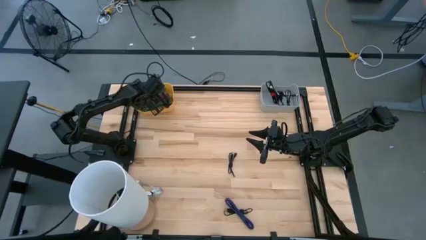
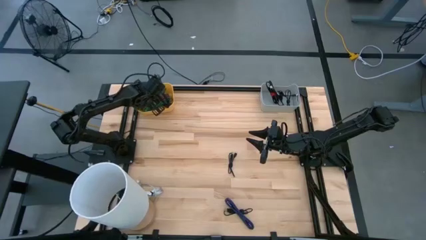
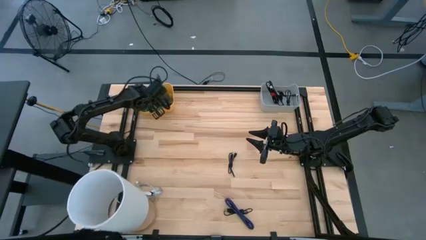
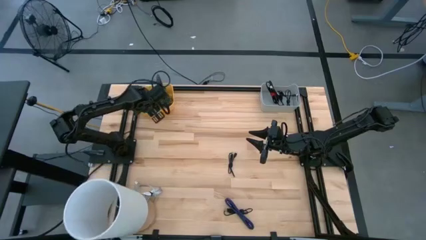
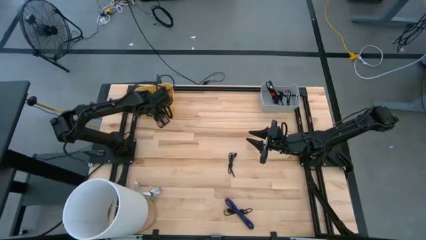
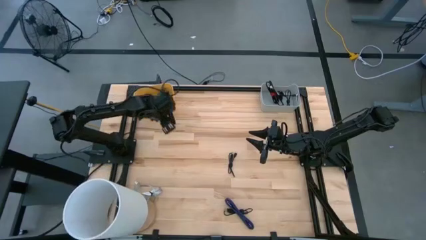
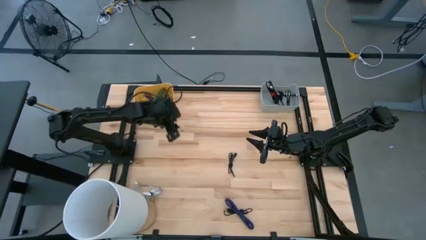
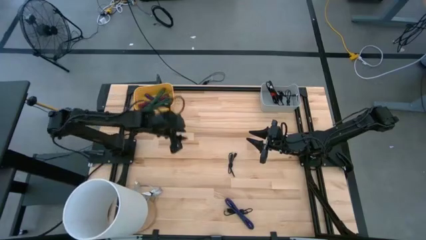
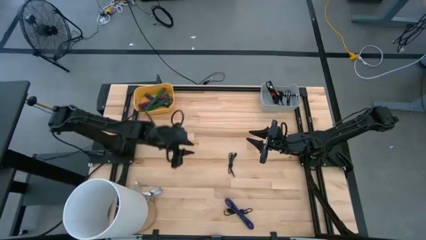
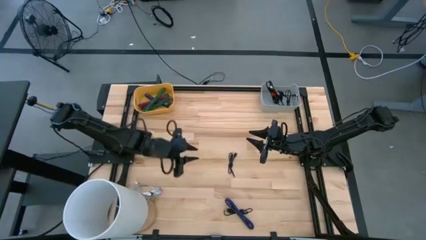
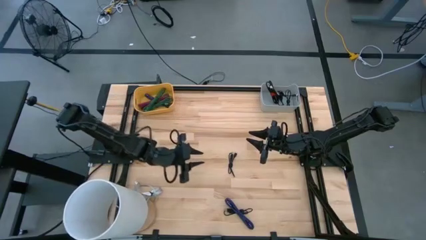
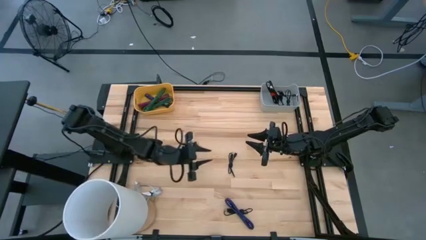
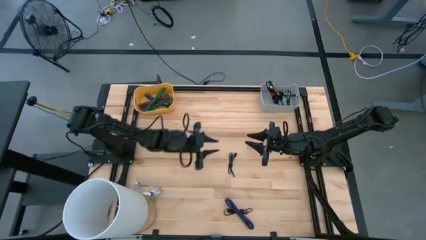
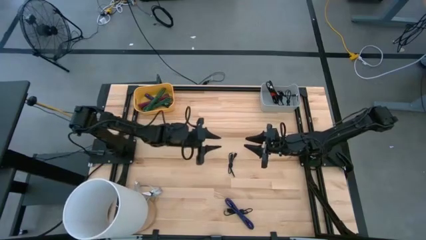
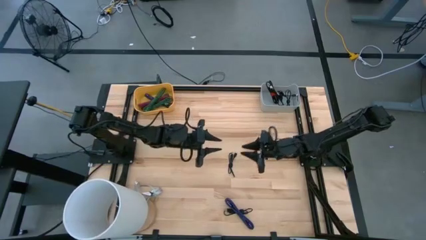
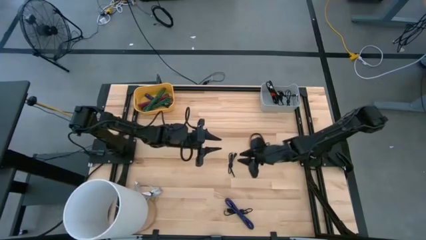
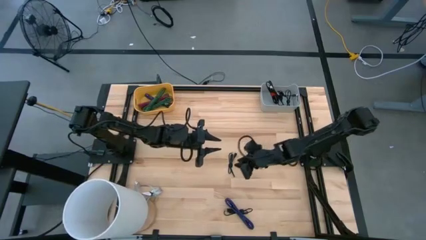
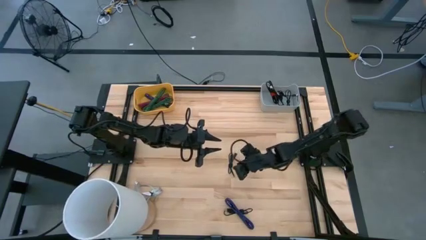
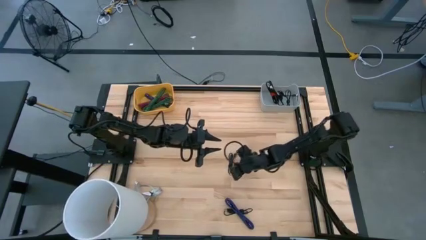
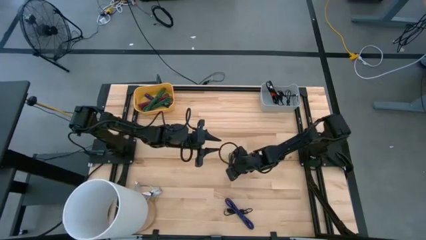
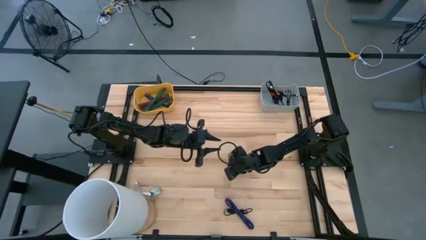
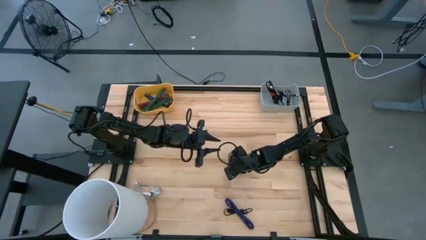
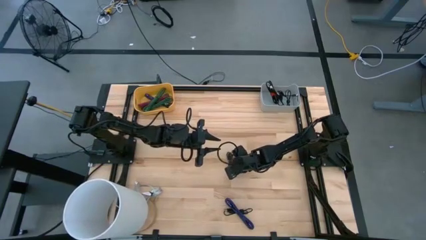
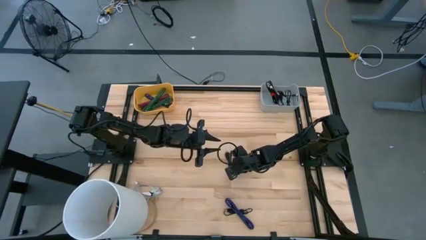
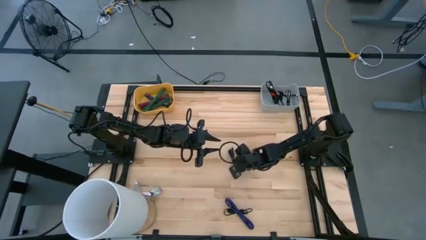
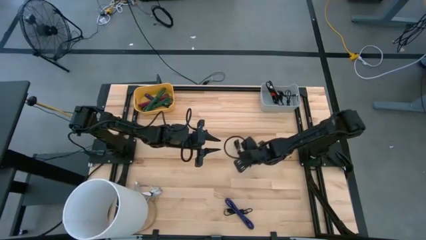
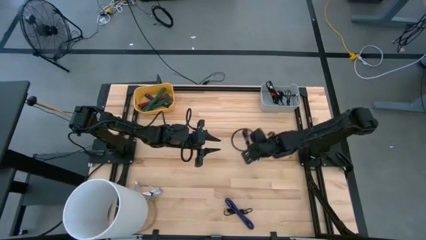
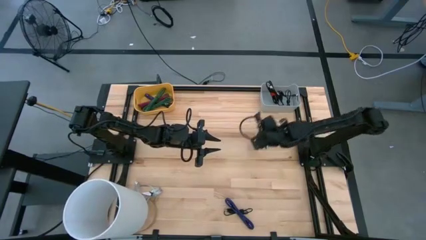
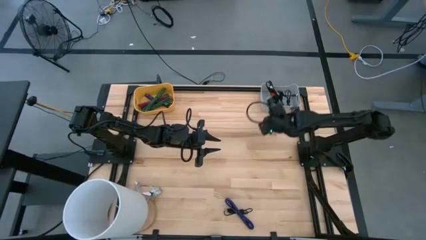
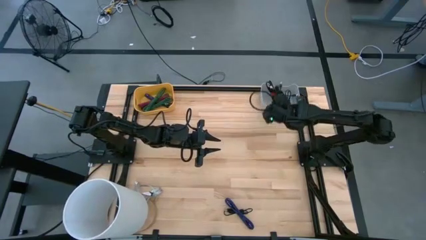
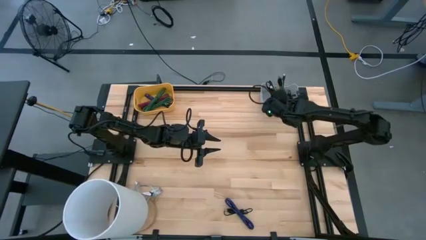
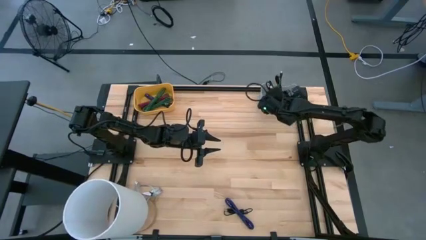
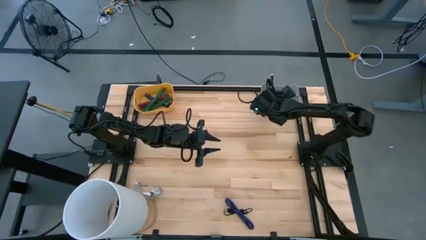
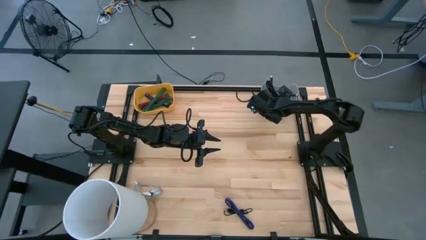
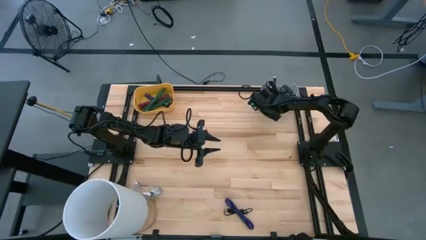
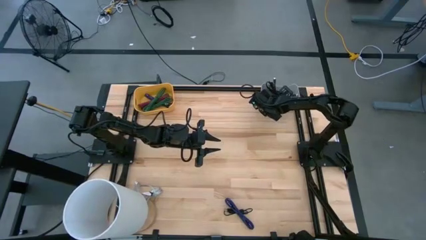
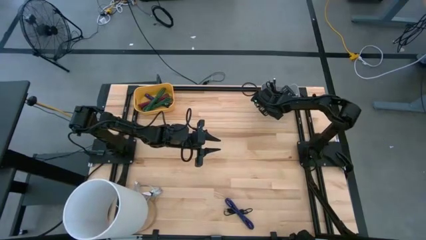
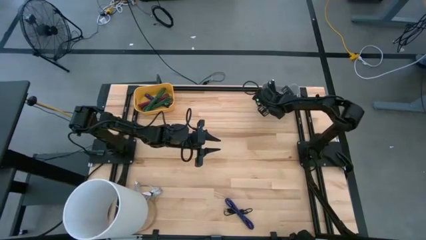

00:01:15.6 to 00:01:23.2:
Task: Pick & Place USB Port
Put the black charger cable into the gray bin

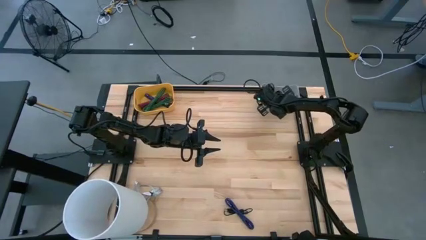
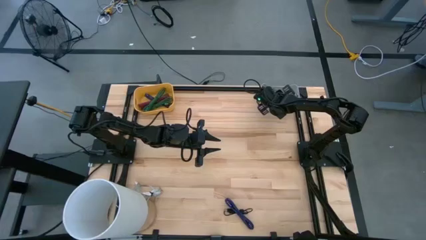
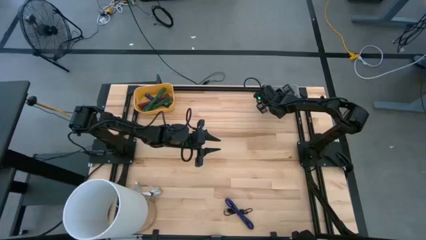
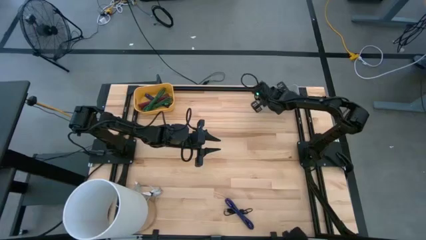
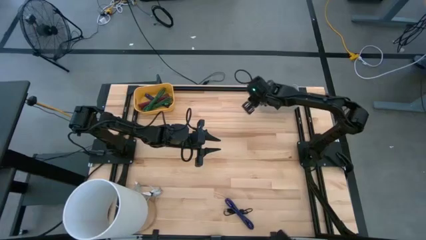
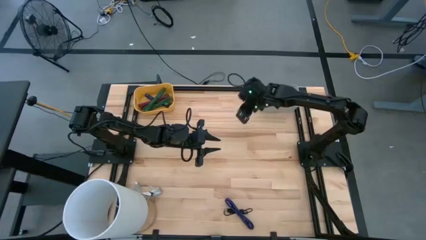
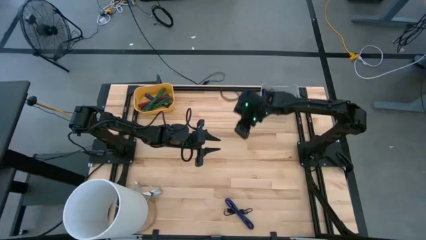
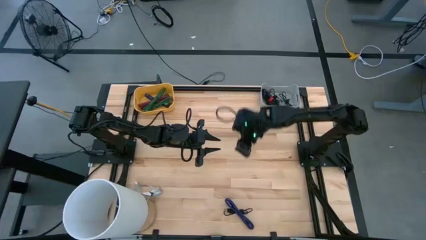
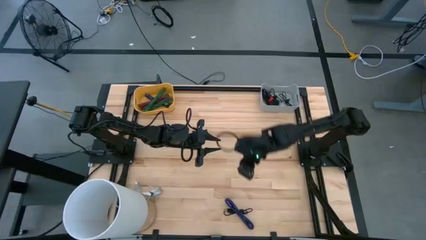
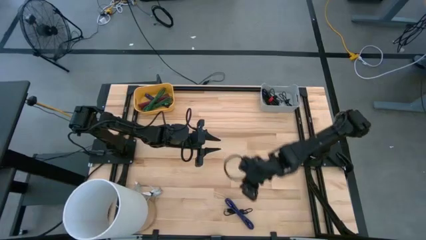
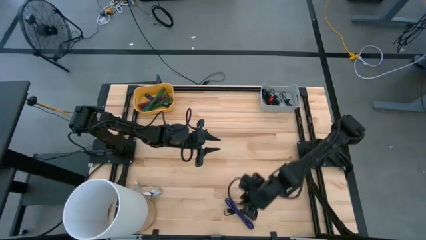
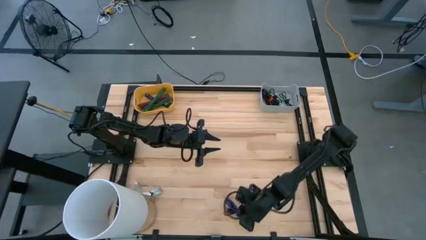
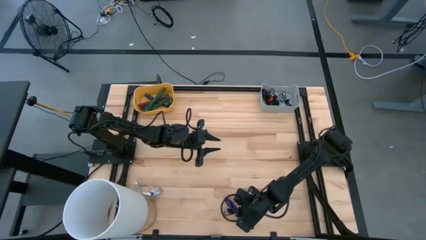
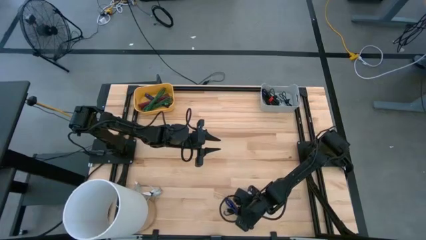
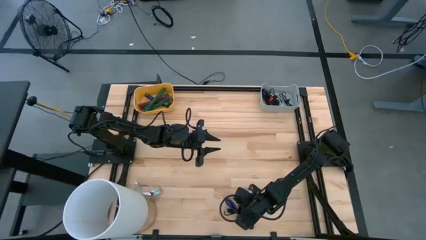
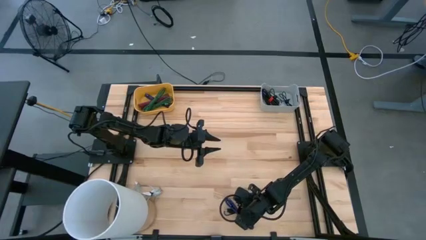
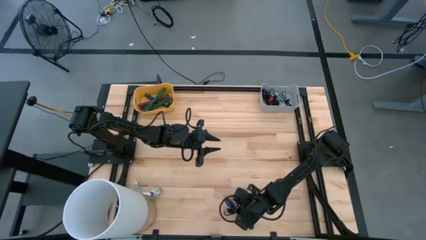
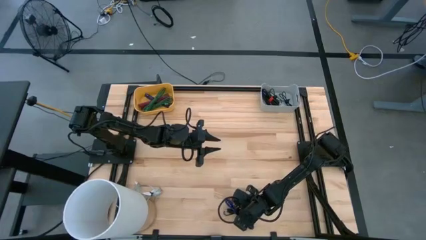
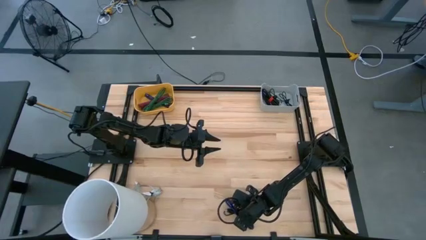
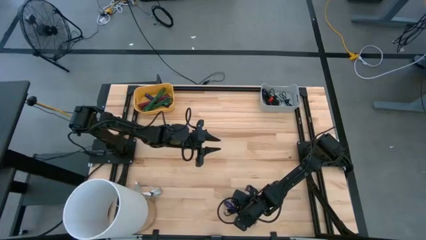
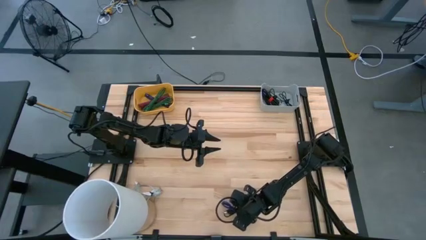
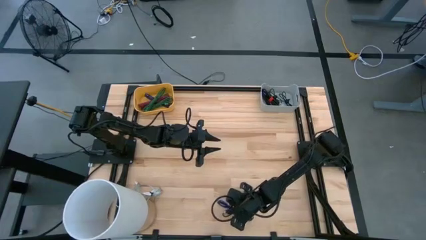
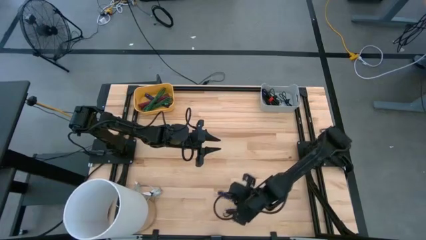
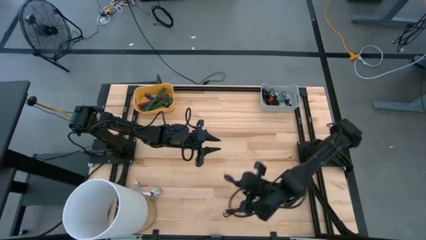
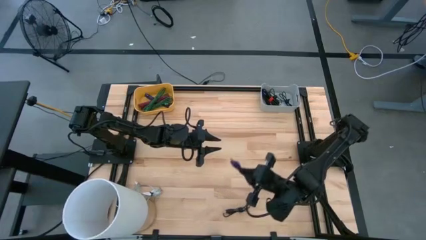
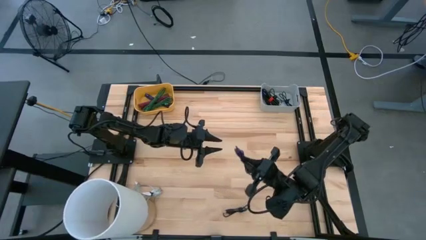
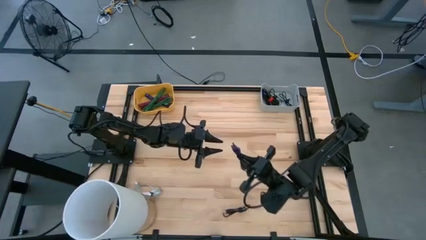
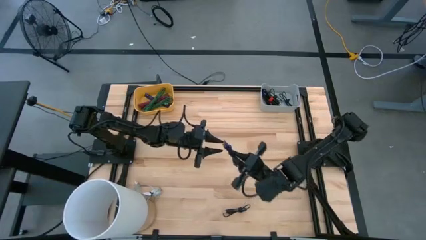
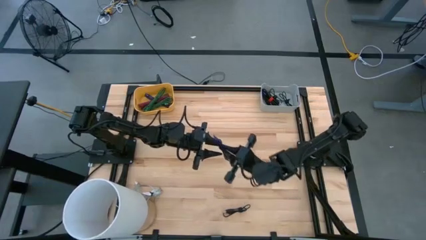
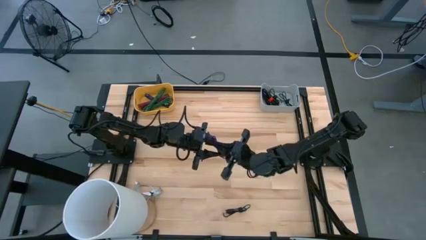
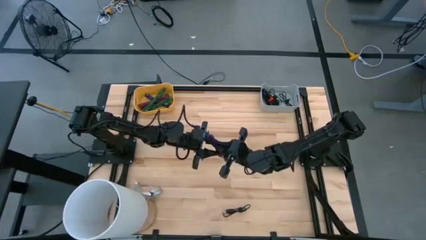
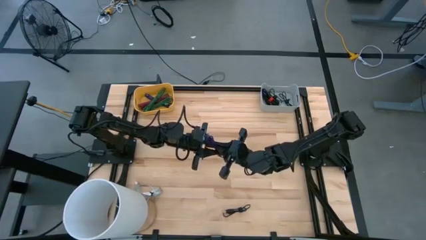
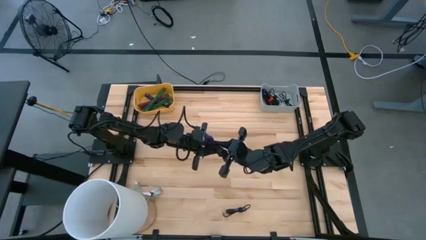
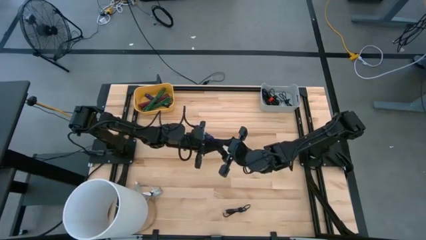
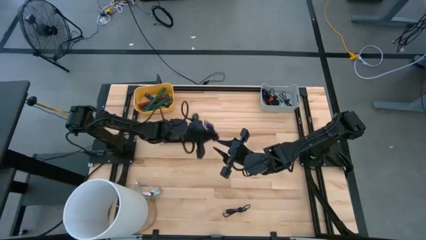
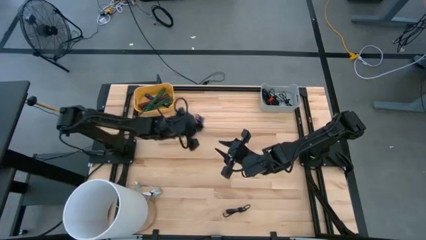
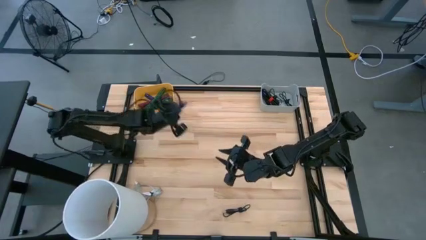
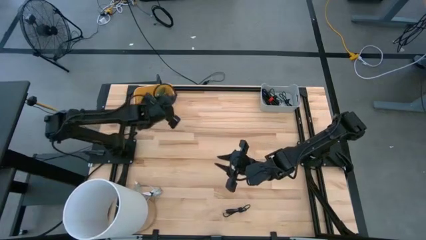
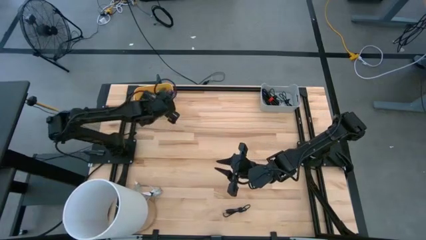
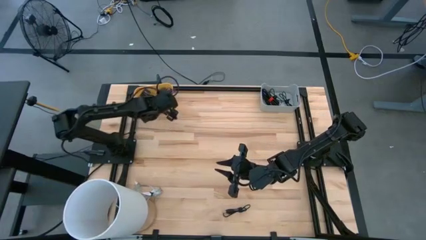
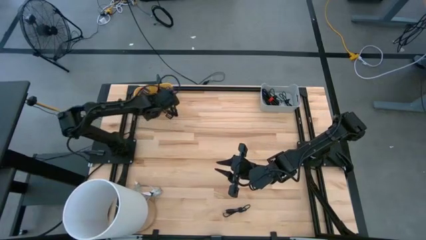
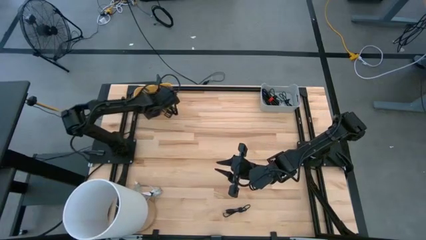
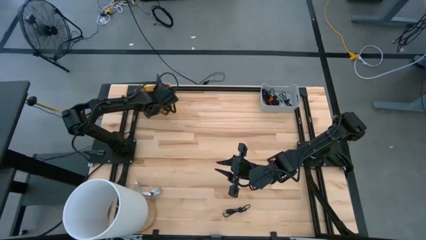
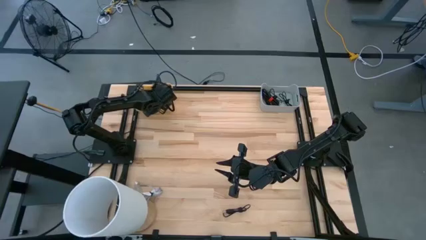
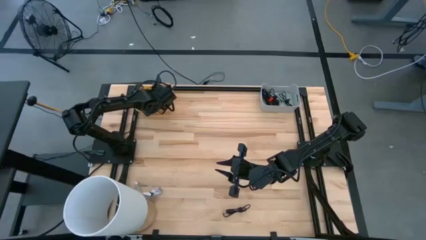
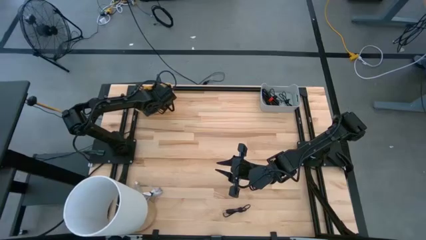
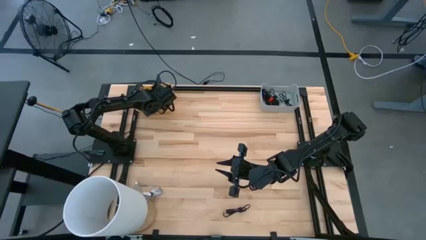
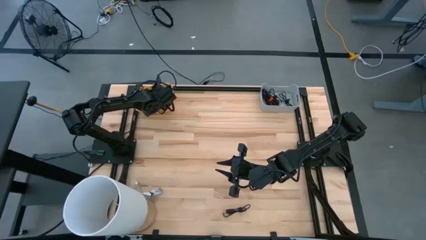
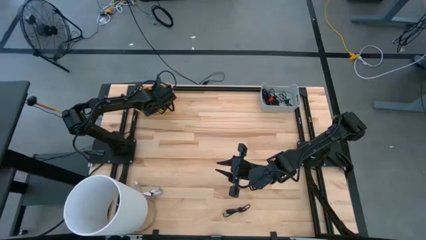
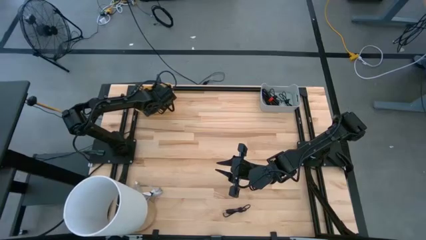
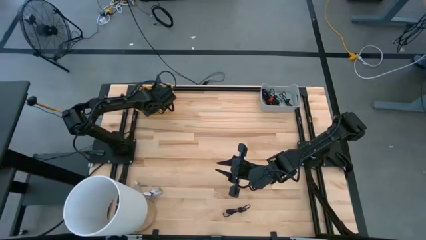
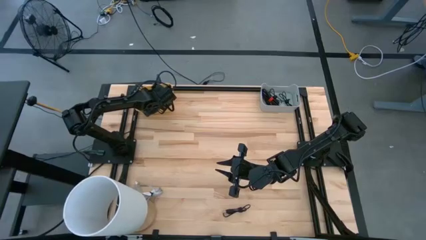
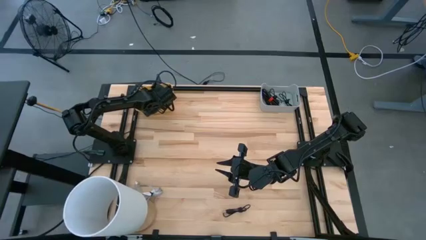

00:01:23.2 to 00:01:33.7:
Put the purple charger cable into the yellow bin
